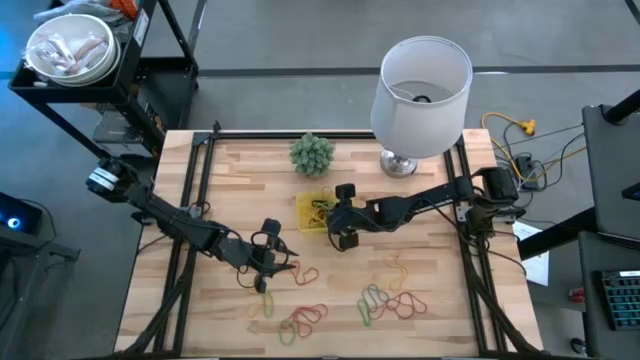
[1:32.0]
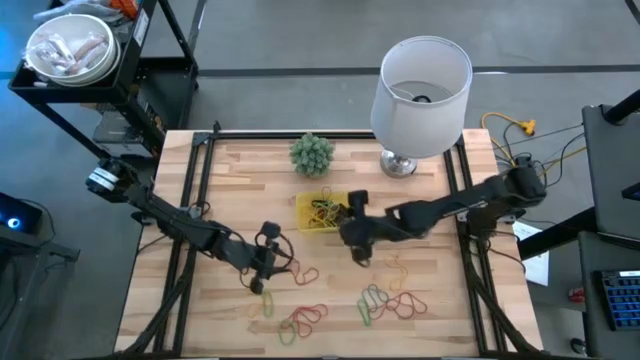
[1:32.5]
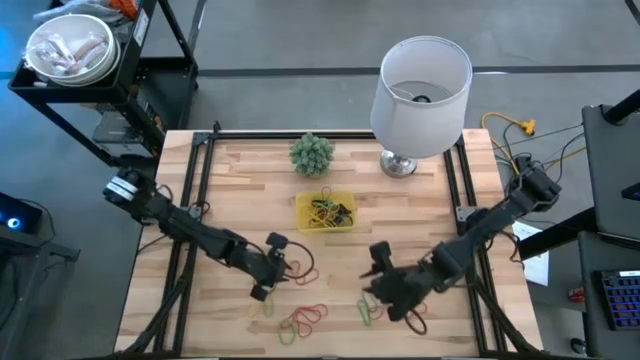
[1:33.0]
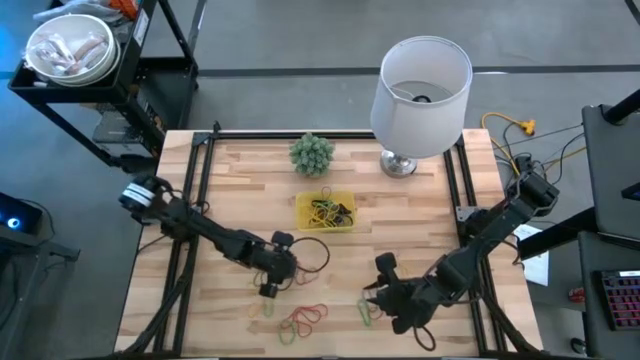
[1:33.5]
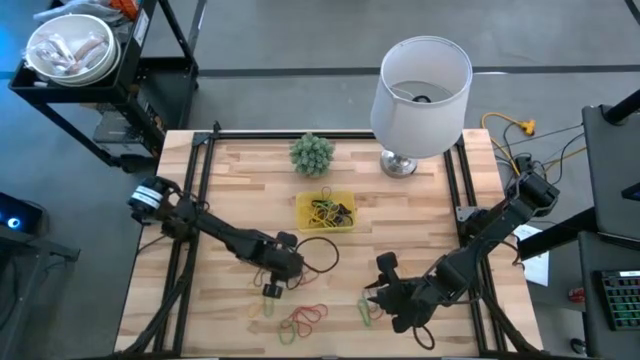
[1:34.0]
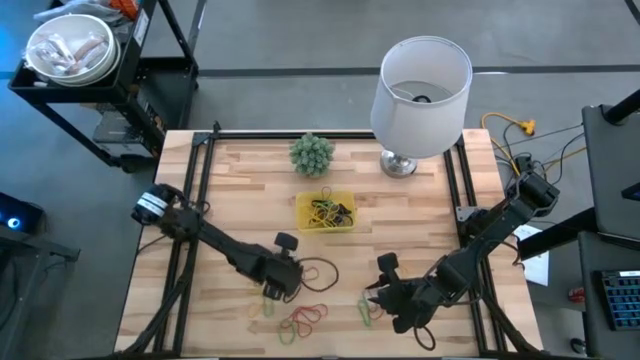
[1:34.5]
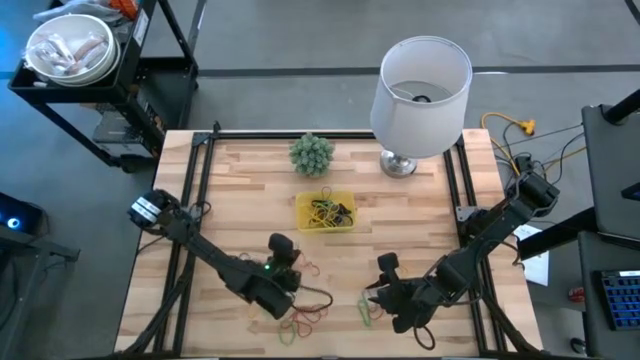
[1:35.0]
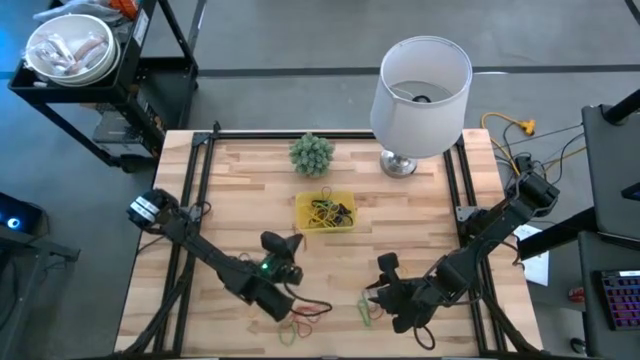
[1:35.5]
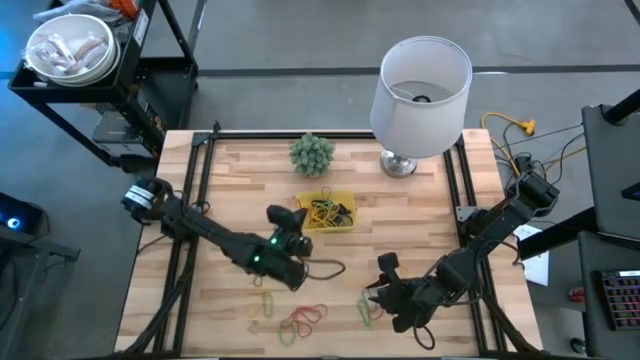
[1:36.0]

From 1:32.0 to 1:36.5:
Task: Pick and place rubber bands into bin
Put the red rubber band into the yellow bin

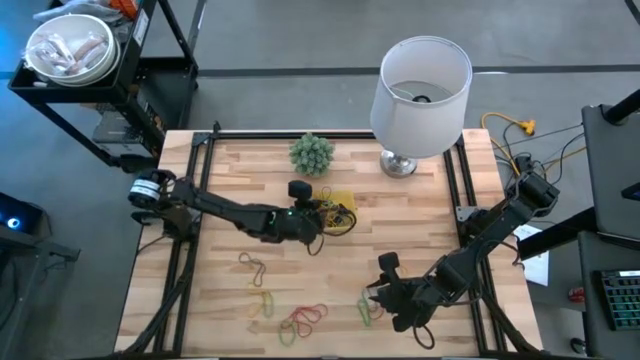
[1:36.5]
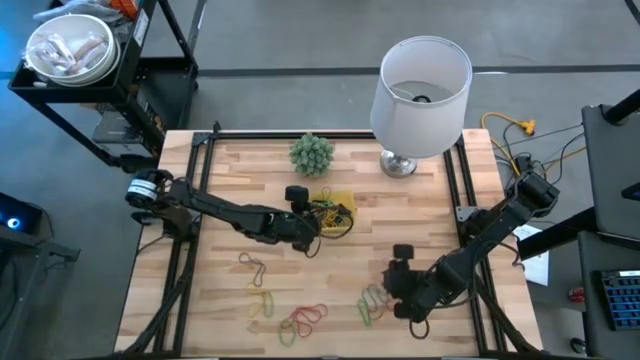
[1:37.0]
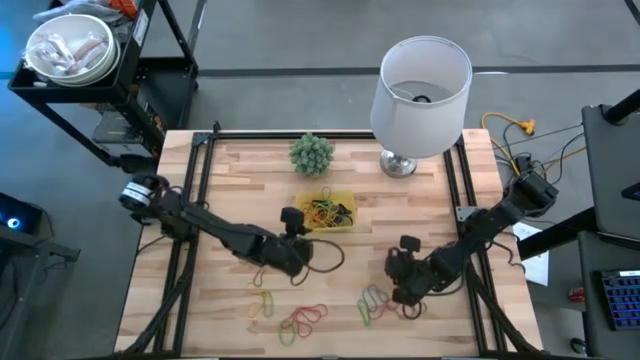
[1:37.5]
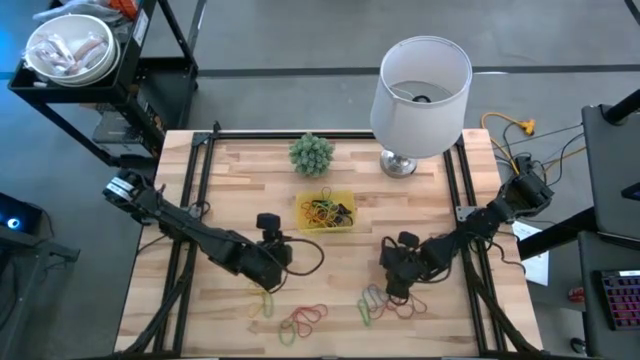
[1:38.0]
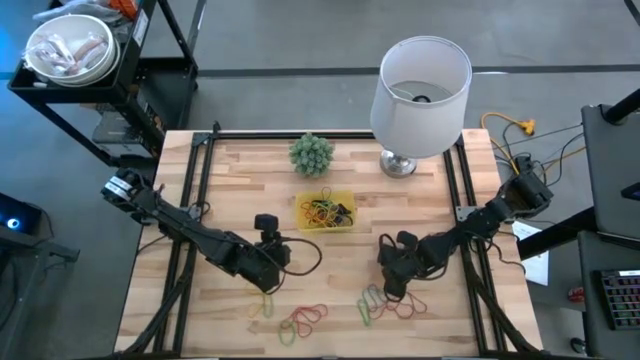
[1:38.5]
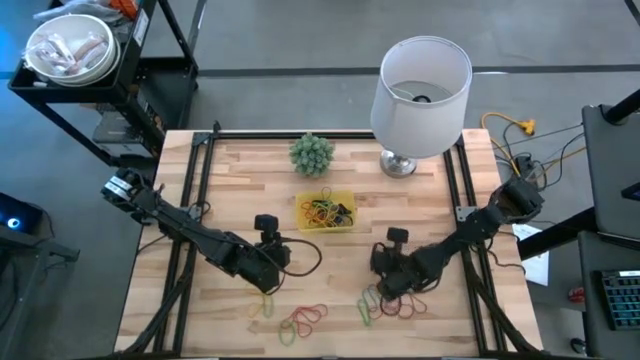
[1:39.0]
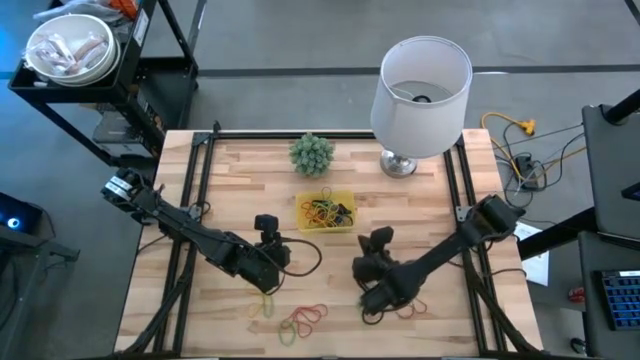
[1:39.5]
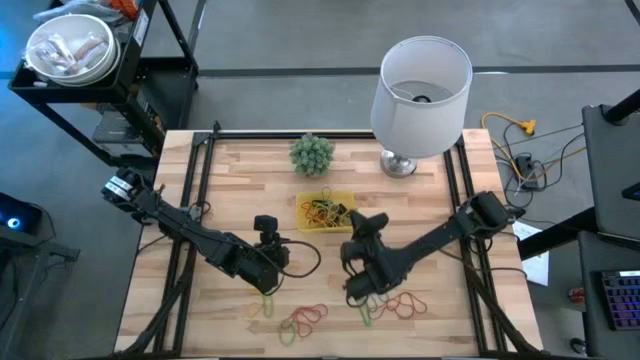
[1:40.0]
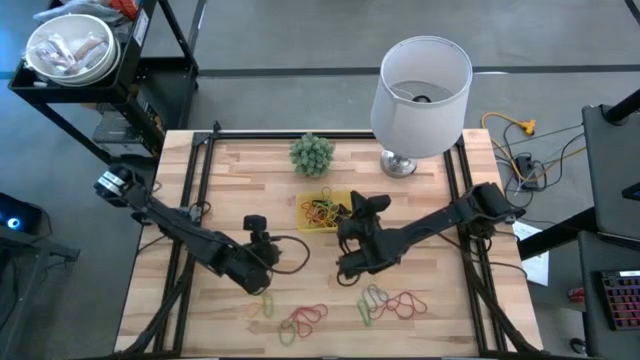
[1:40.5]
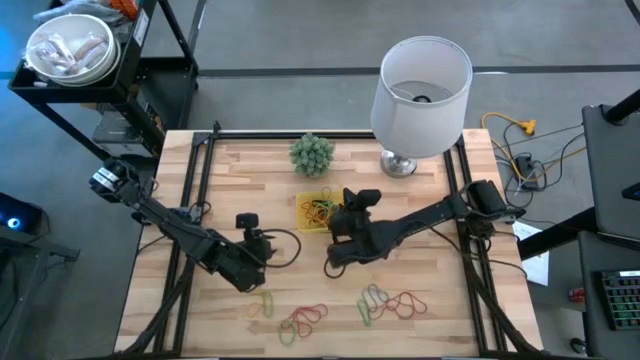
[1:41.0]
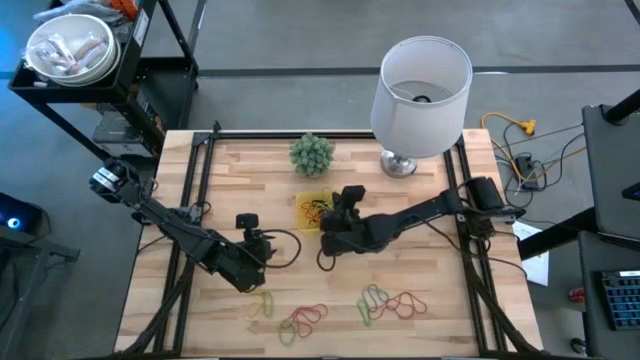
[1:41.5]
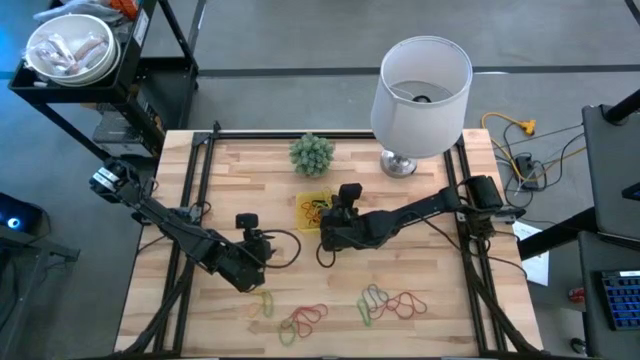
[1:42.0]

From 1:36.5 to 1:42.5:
Put the yellow rubber band into the yellow bin

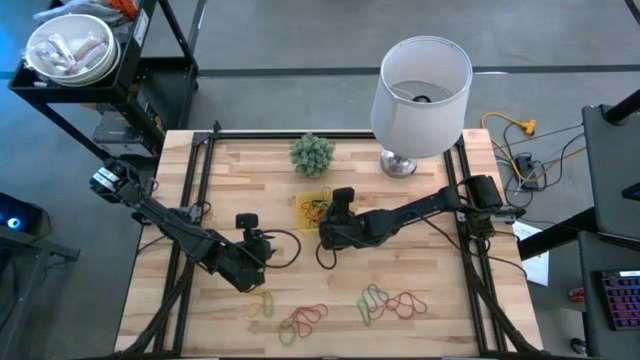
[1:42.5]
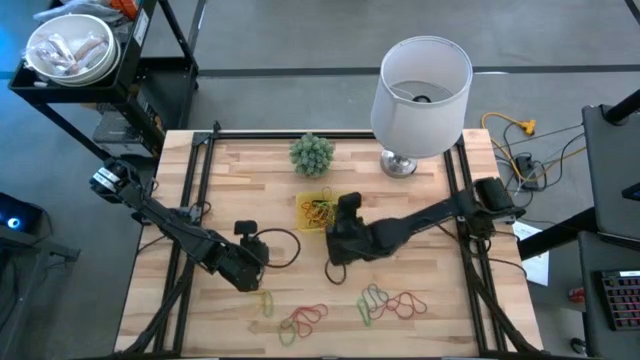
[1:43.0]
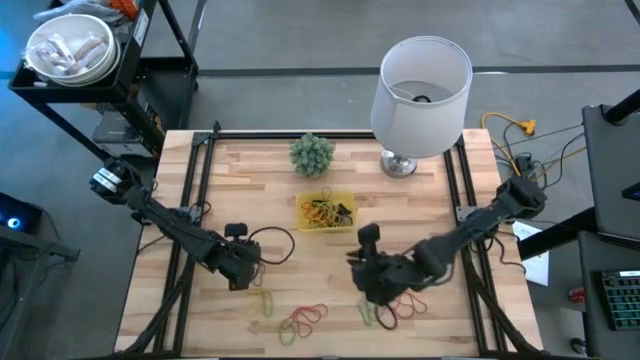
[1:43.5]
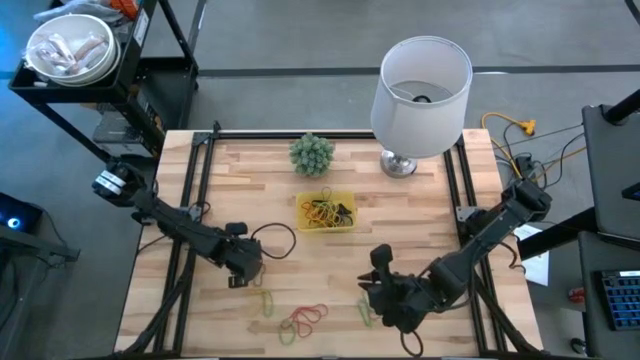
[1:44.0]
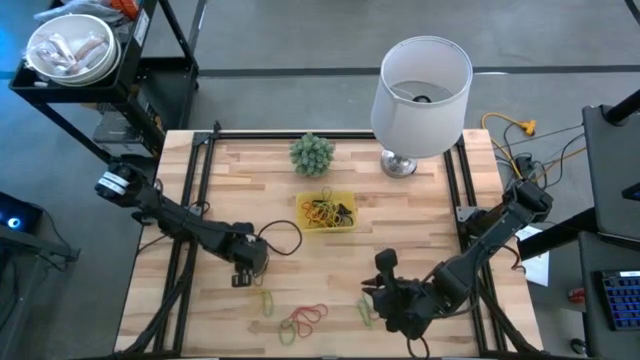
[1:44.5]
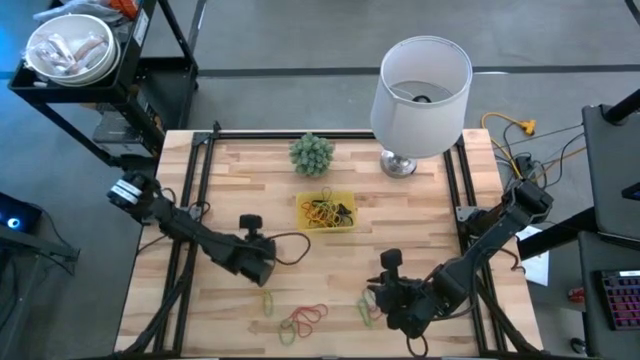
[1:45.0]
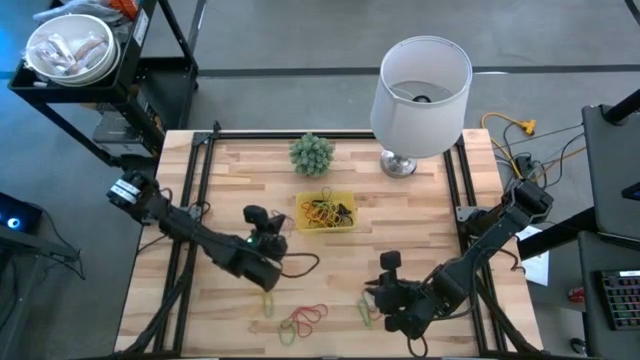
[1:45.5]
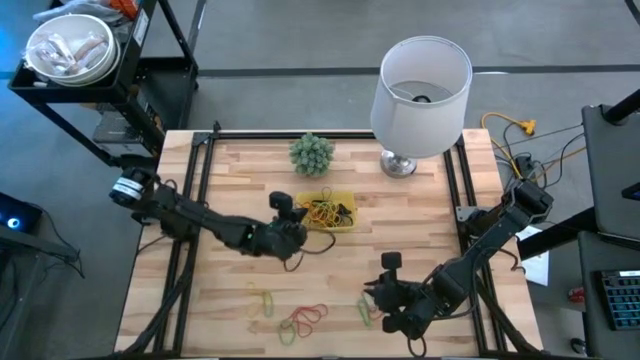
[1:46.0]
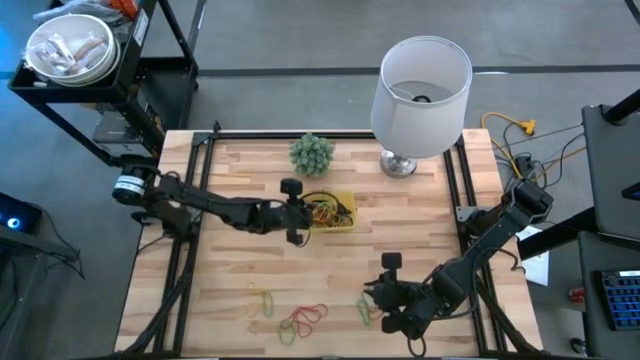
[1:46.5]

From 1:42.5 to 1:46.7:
Put the purple rubber band into the yellow bin

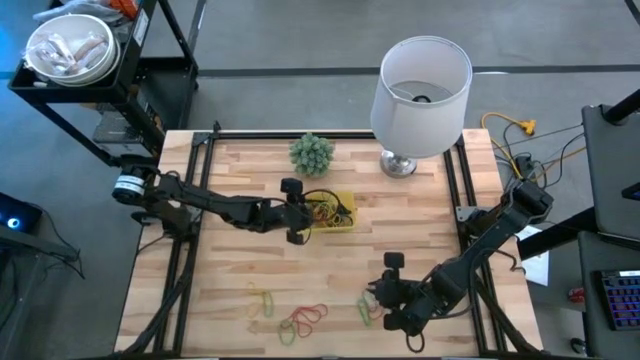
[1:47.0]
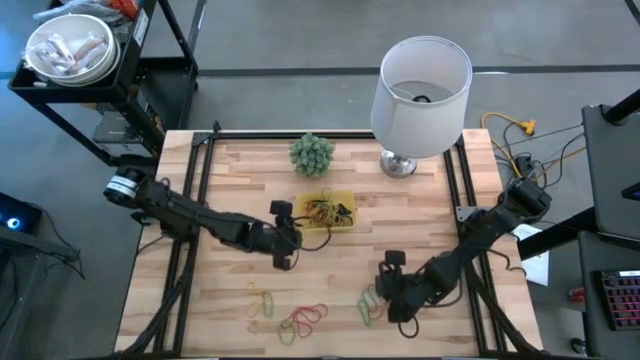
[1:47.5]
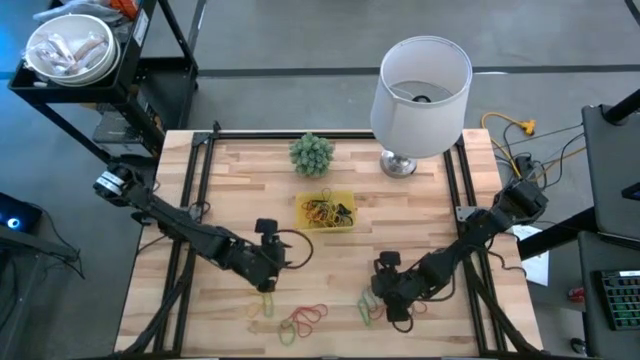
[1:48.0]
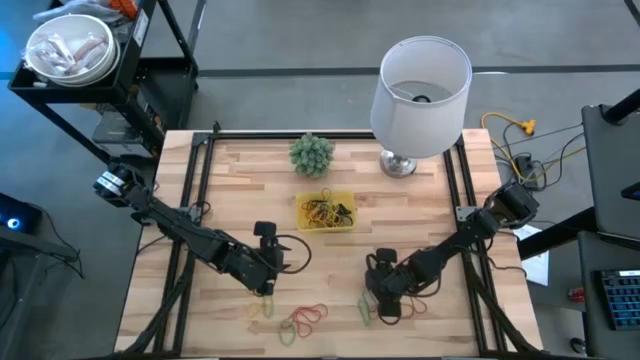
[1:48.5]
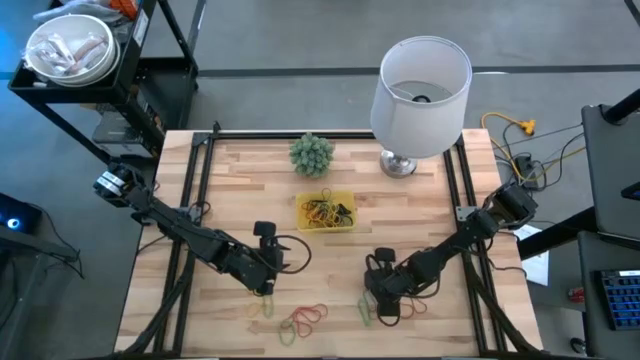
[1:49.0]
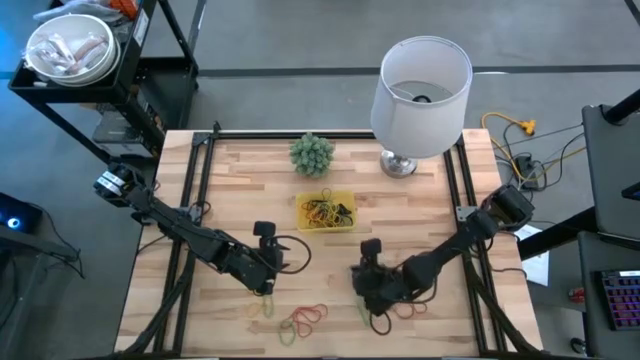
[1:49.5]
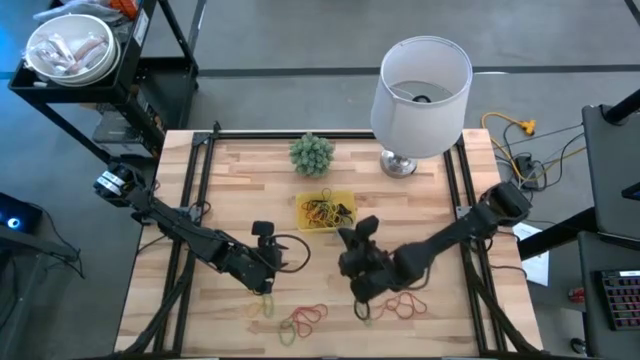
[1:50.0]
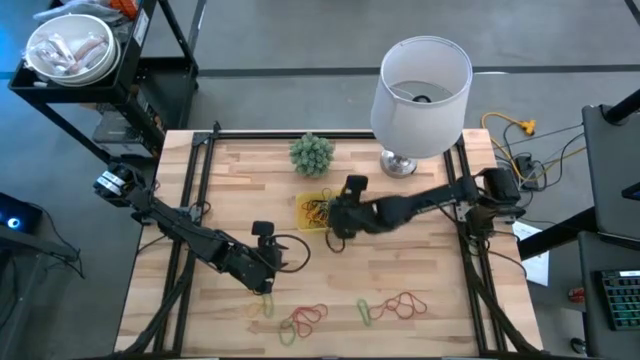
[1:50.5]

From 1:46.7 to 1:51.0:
Put the blue rubber band into the yellow bin

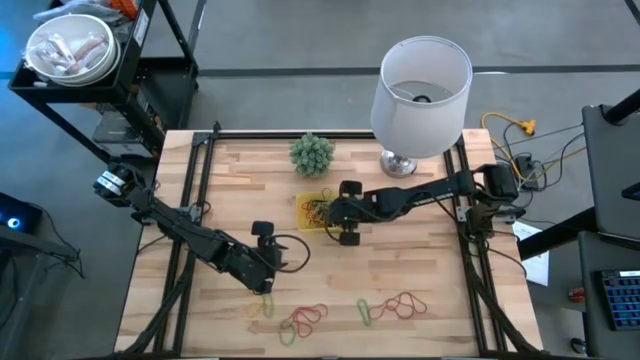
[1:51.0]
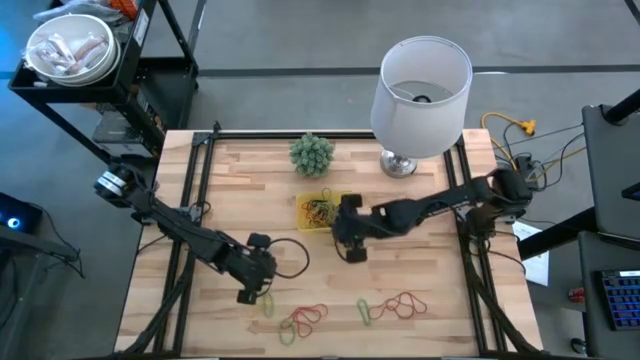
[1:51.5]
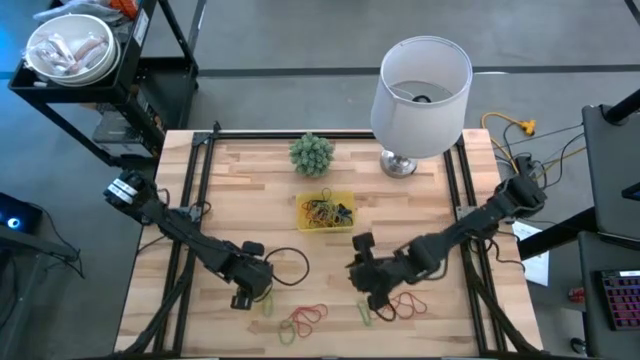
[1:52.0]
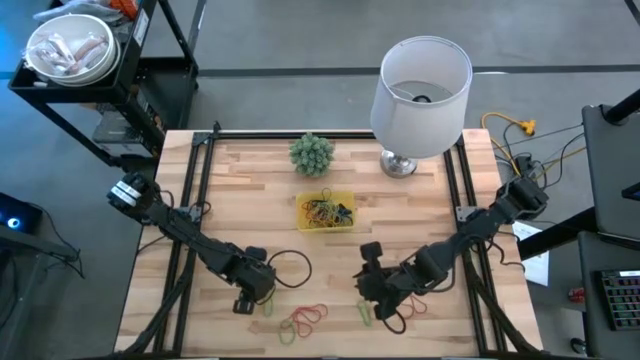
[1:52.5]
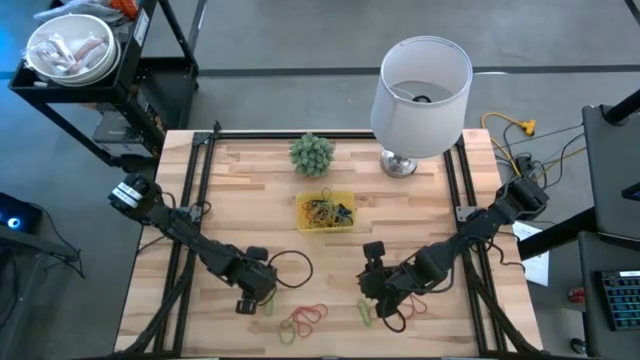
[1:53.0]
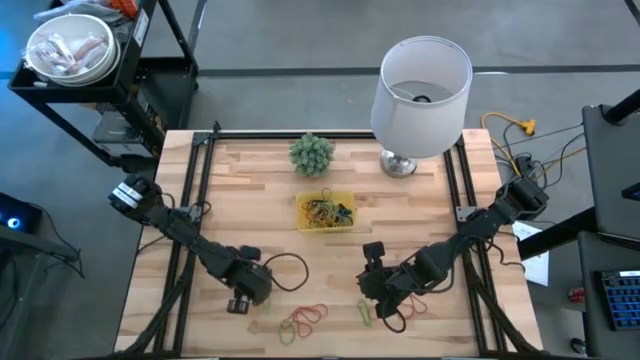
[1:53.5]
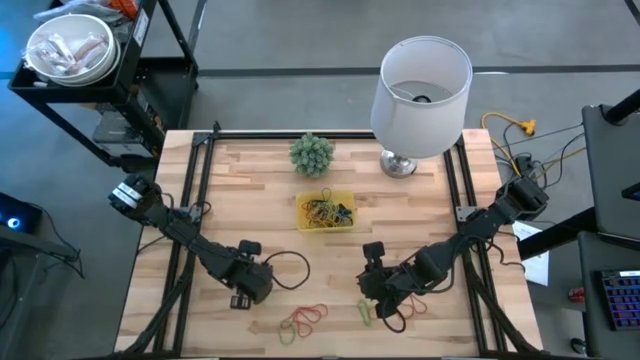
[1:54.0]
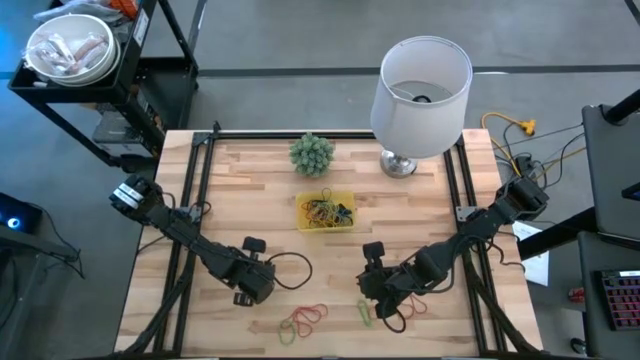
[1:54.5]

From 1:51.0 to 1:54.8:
Put the yellow rubber band into the yellow bin
